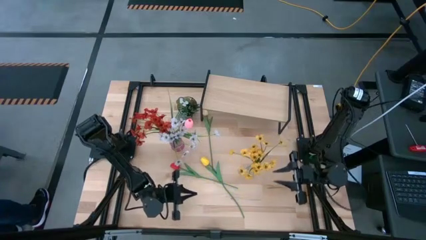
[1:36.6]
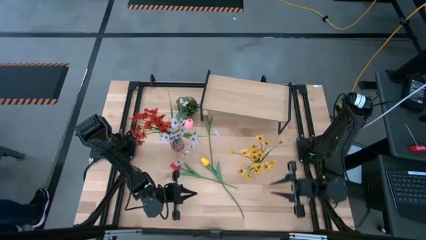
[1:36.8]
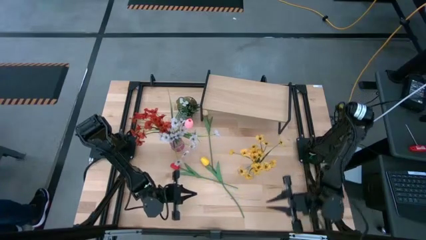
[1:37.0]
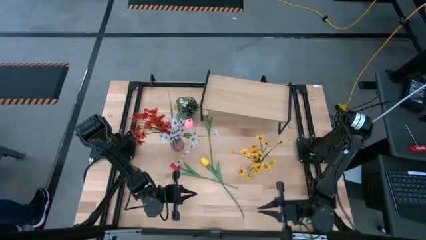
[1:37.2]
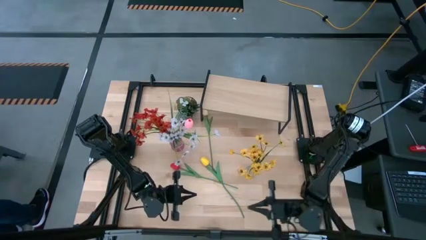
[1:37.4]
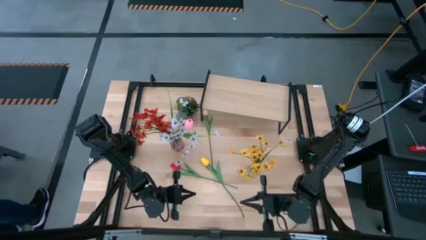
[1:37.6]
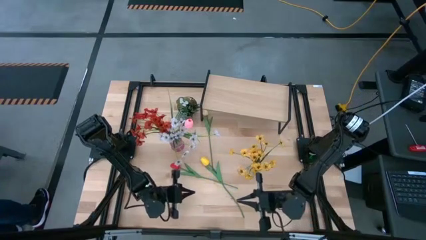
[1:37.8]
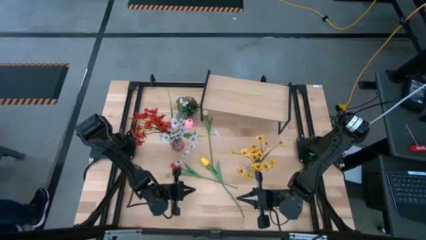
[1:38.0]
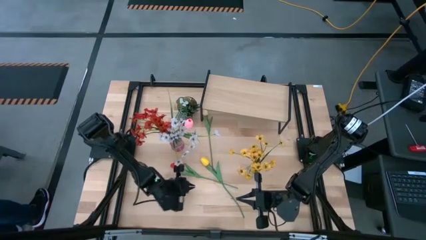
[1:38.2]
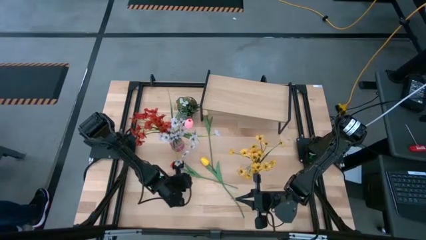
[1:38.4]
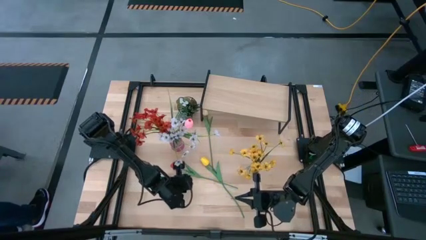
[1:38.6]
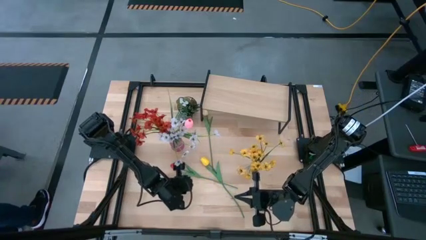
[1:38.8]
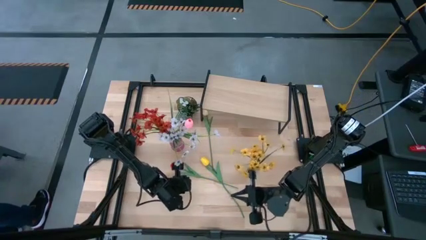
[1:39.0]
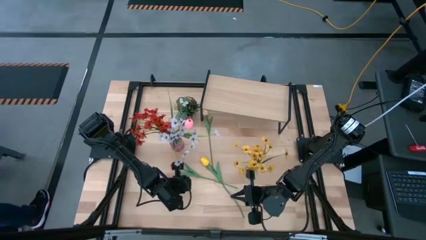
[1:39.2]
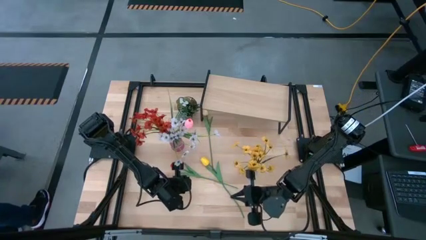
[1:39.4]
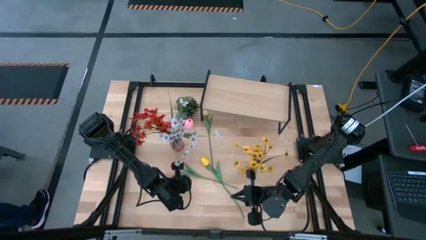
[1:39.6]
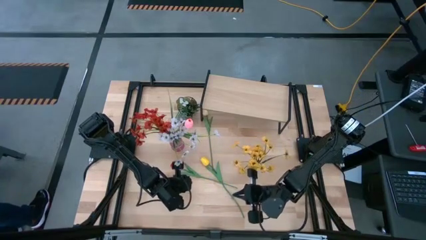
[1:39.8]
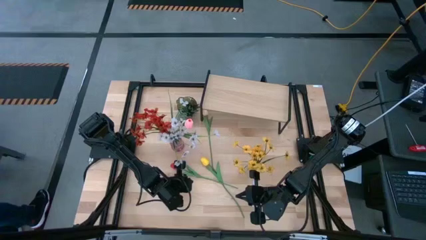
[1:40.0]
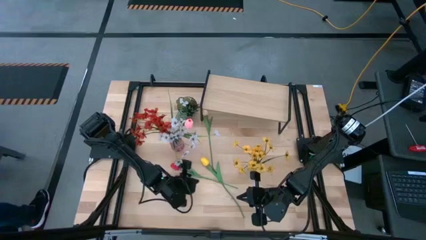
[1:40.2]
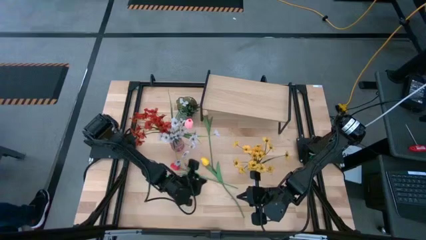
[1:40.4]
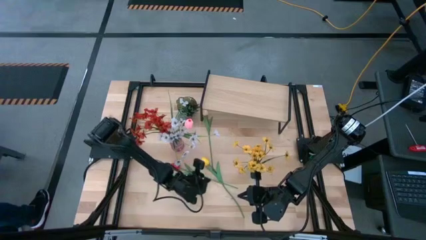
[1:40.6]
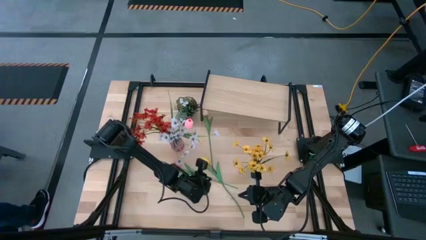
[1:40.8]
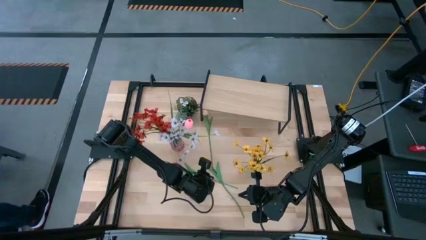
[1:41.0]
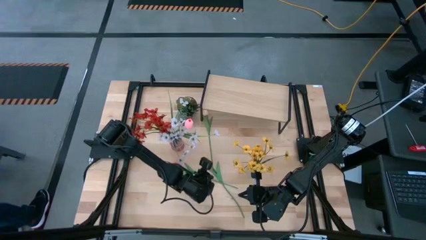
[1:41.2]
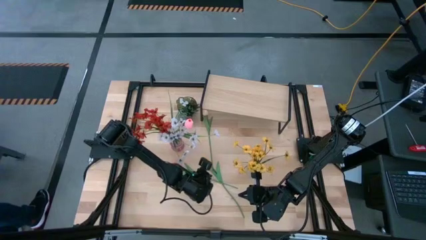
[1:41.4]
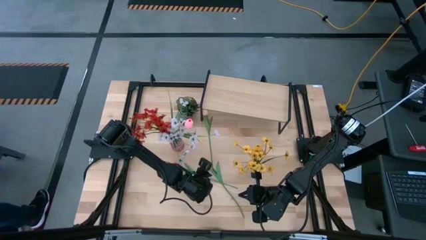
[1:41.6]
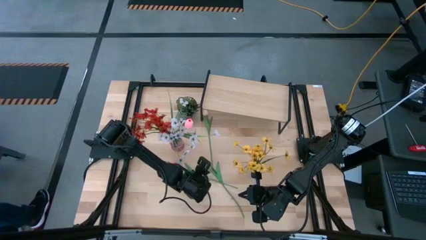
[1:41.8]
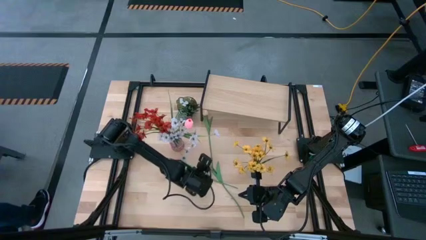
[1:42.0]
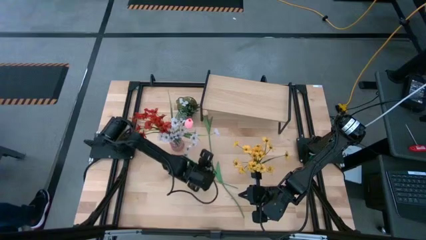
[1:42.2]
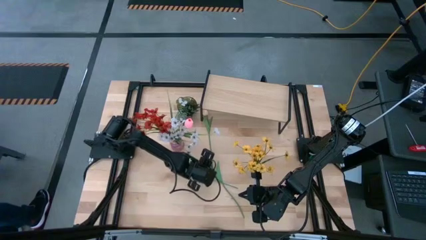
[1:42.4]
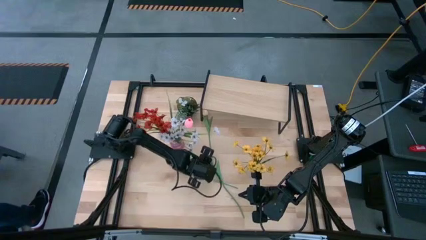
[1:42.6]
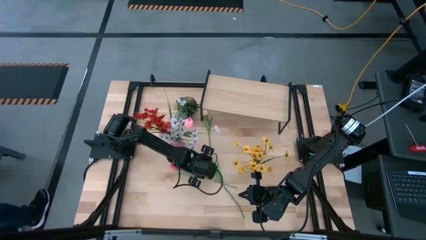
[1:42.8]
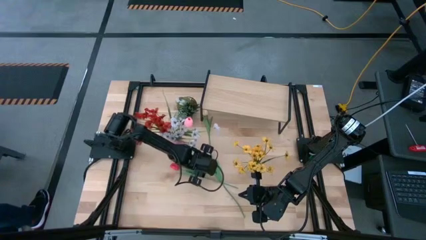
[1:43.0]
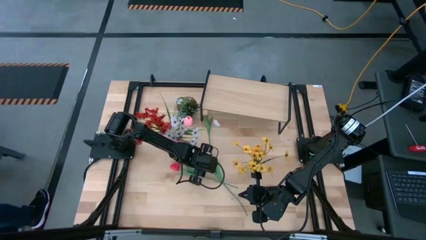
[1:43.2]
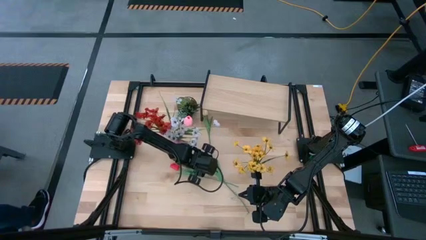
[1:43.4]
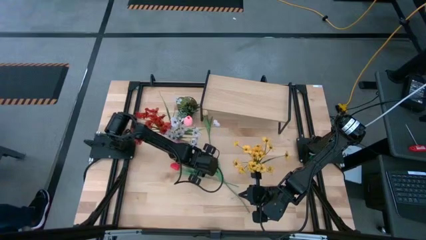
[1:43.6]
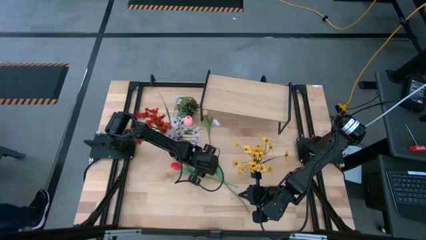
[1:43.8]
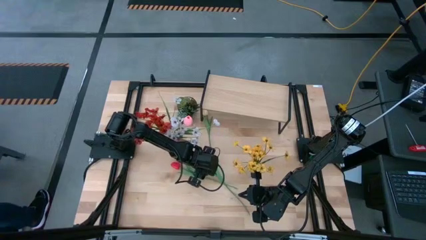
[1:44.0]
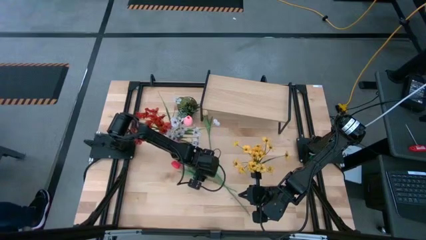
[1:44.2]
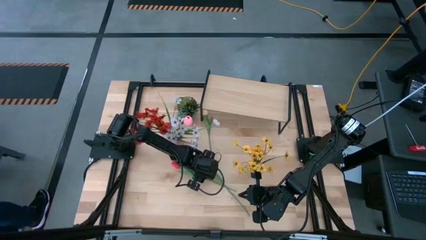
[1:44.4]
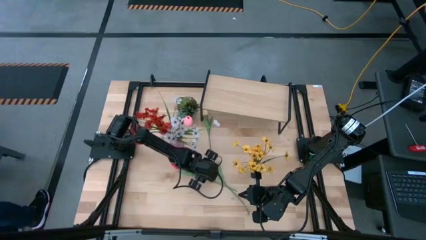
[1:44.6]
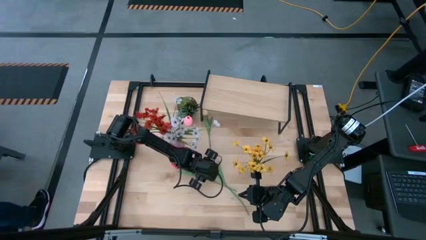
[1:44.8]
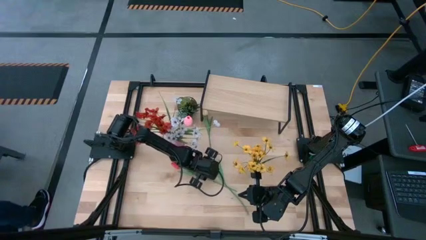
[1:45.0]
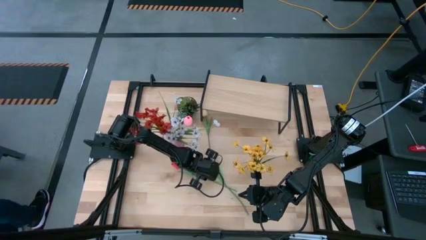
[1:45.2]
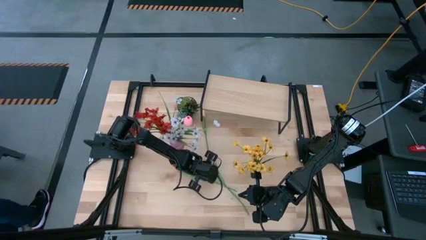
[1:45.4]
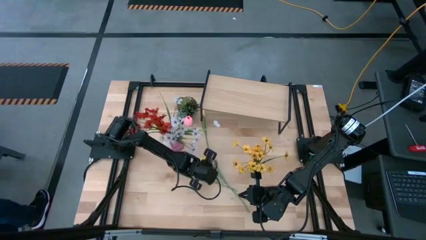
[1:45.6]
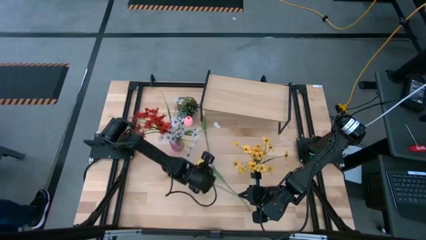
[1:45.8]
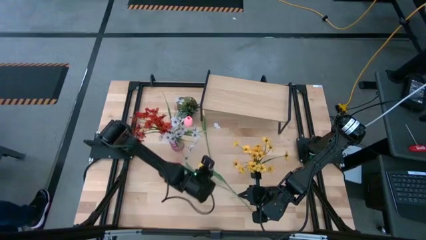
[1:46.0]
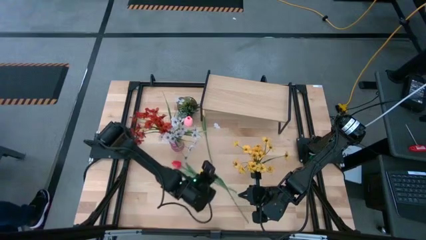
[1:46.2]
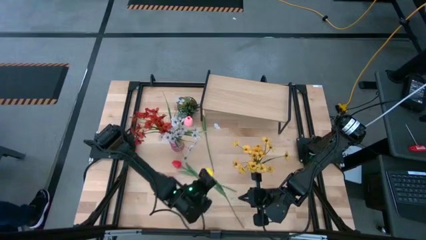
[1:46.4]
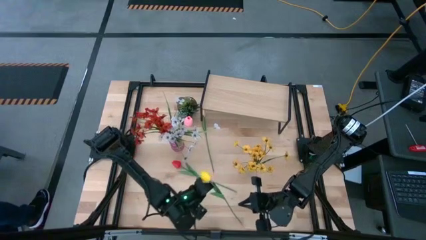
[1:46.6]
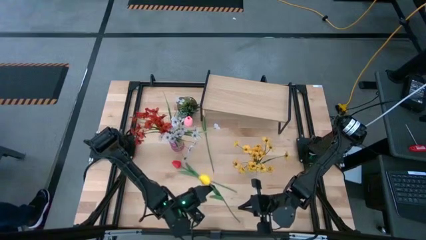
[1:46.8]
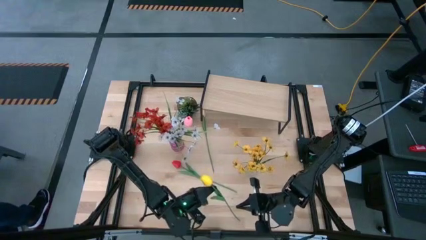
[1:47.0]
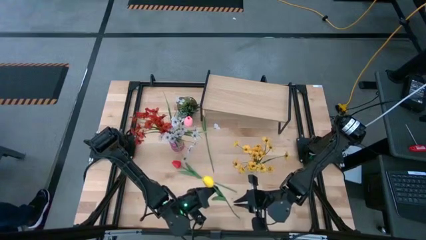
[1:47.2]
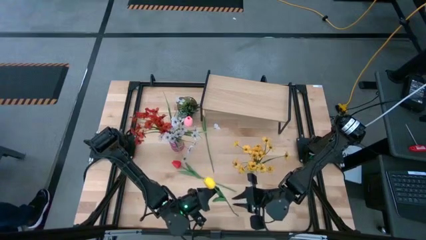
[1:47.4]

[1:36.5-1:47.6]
Task: Pick and place flowers into a vace then onto a shelf
Put the yellow flower into the transparent vase

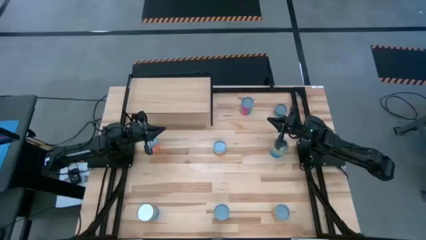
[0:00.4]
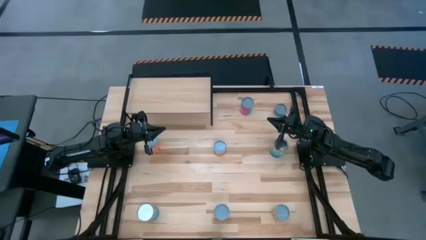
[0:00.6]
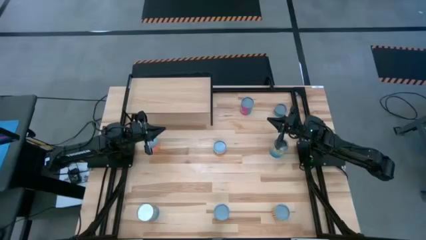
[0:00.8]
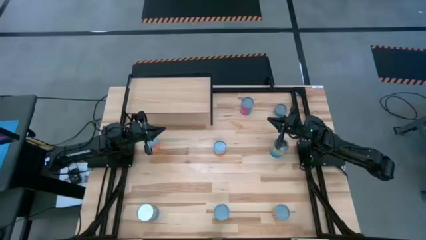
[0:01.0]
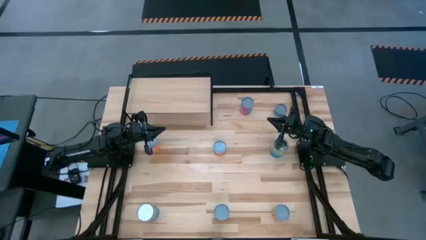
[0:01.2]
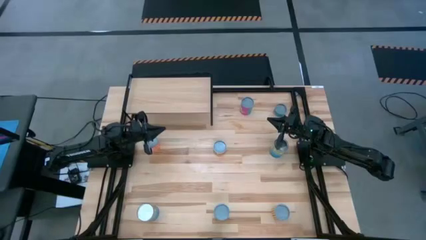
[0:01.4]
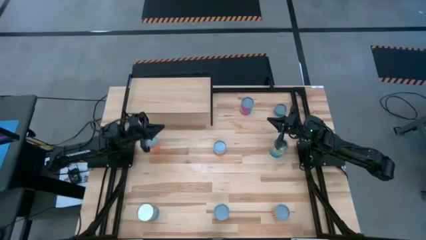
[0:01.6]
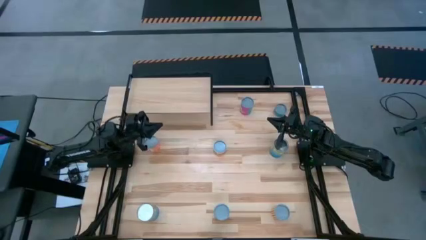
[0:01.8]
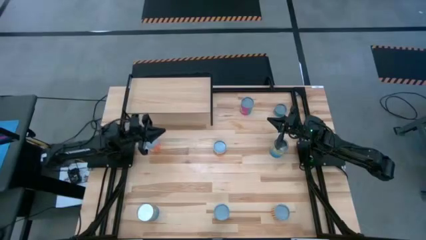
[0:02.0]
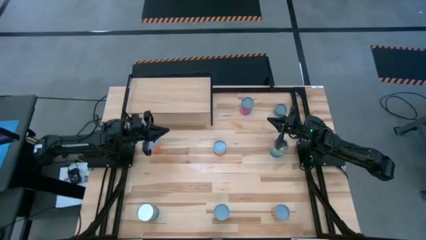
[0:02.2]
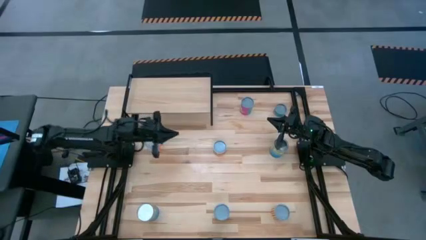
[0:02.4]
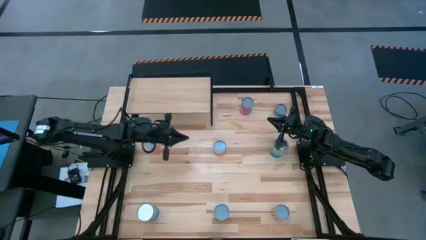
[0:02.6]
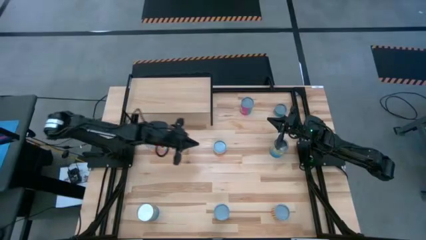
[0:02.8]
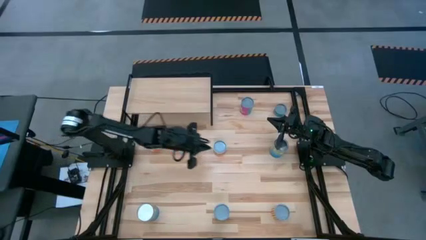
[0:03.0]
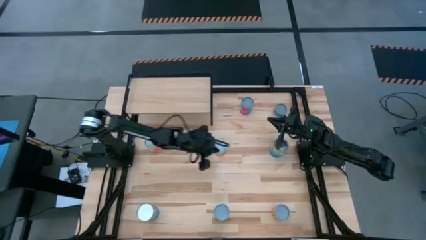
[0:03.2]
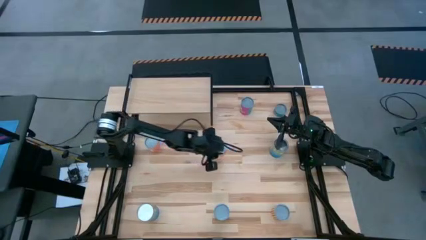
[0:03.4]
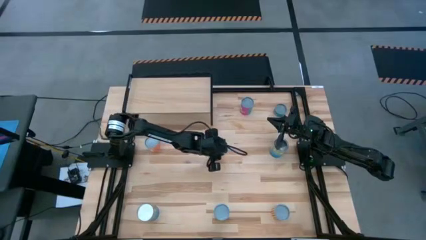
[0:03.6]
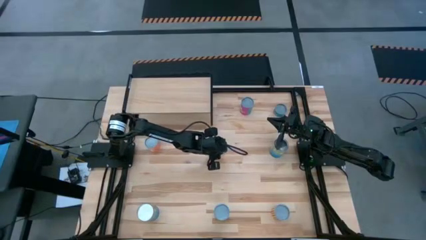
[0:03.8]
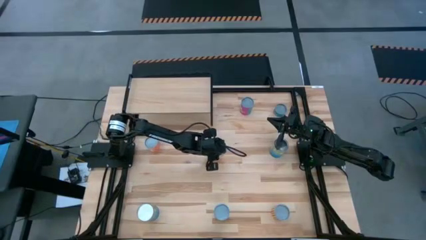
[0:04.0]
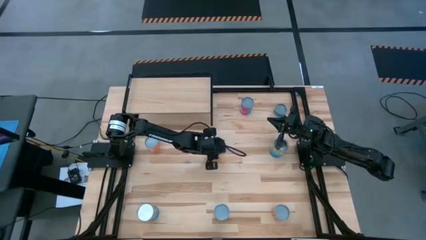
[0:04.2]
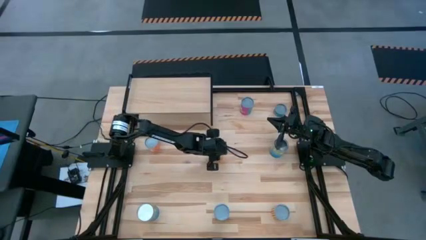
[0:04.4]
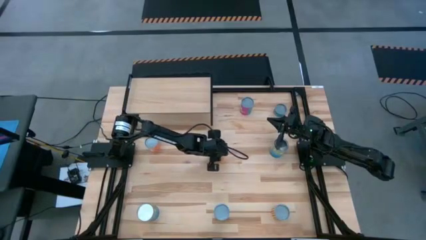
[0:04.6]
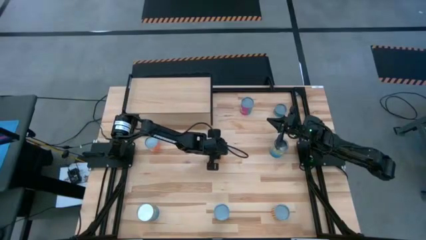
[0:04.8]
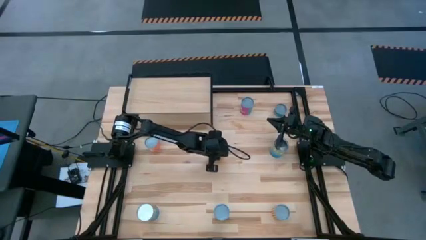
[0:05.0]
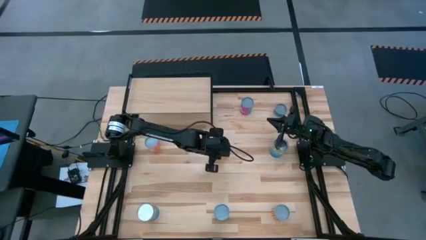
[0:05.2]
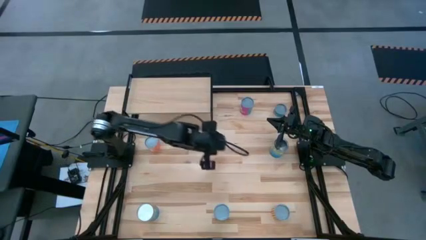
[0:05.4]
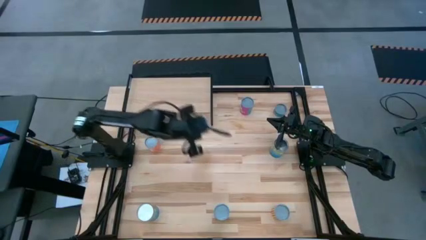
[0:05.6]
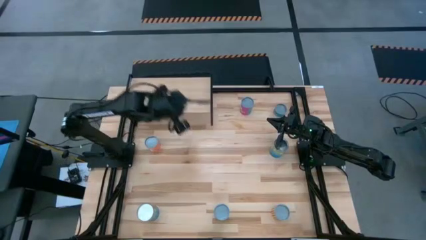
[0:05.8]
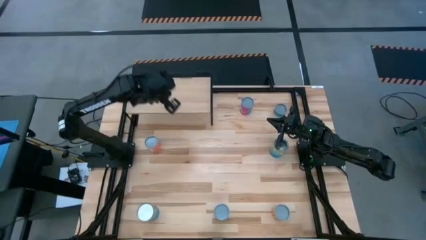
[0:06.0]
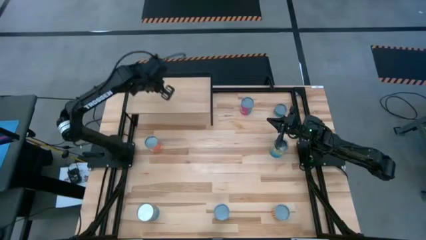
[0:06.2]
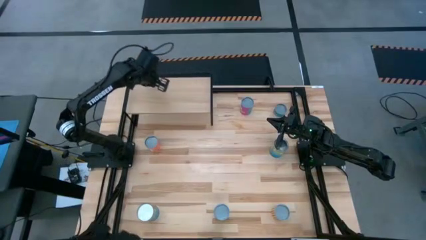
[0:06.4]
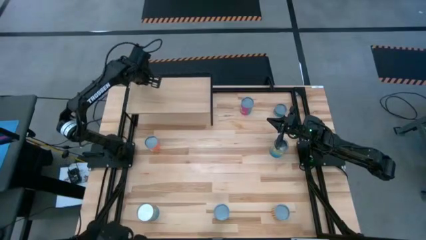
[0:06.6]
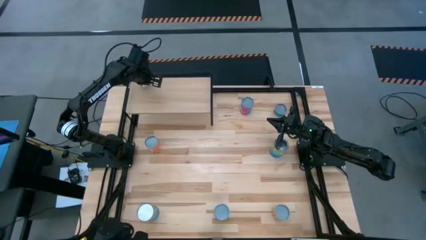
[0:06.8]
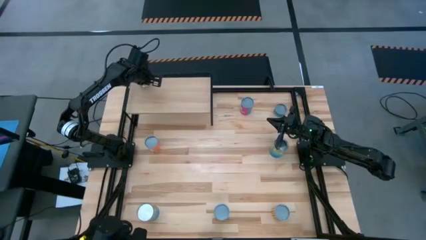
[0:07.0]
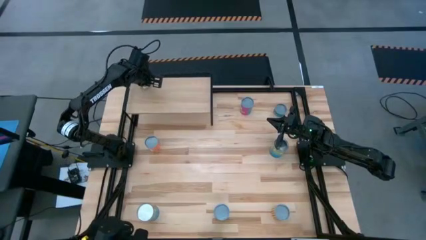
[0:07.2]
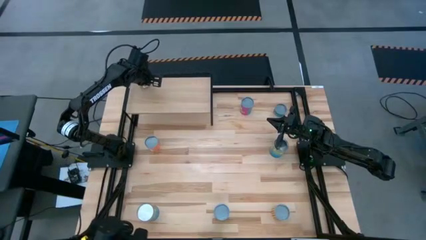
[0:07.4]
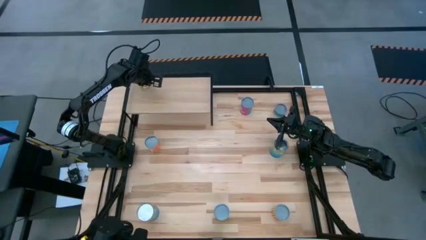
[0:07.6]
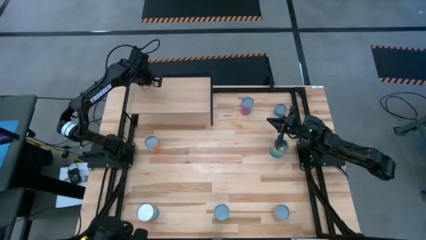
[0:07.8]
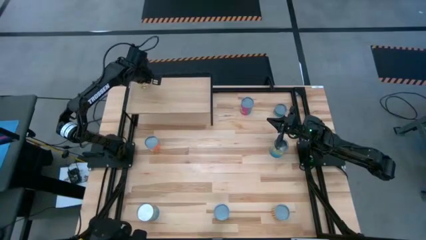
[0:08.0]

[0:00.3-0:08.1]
Task: Pick and place cans onto a shelf
Put the canned mushrooms on the shelf
